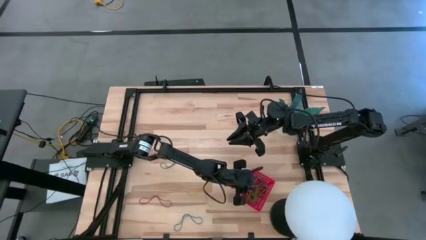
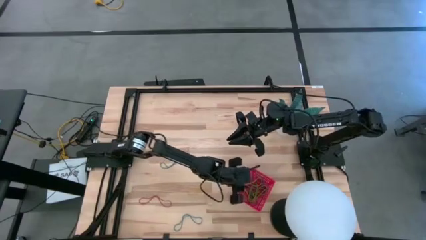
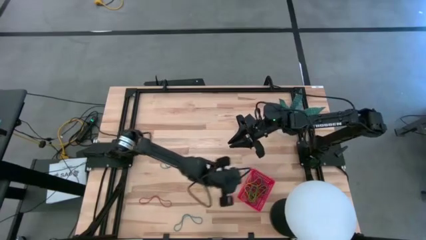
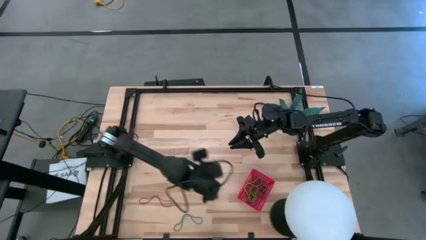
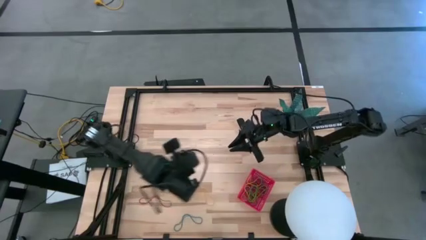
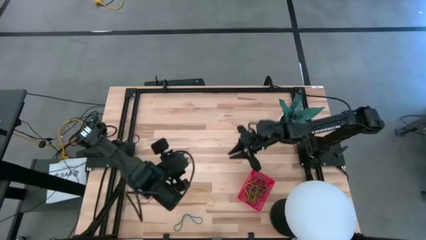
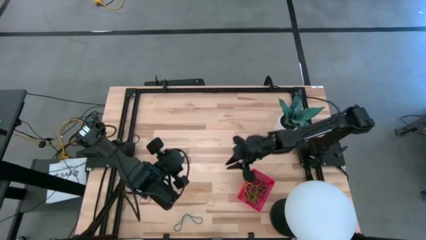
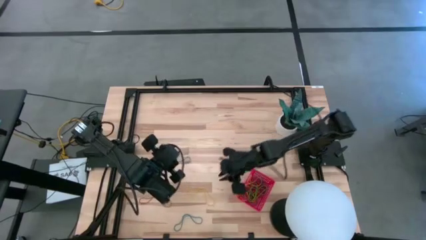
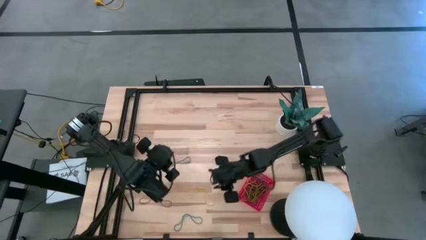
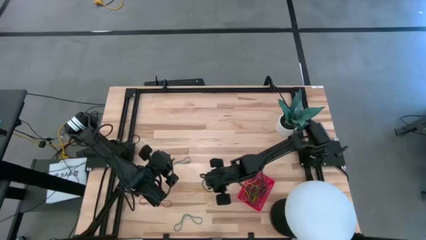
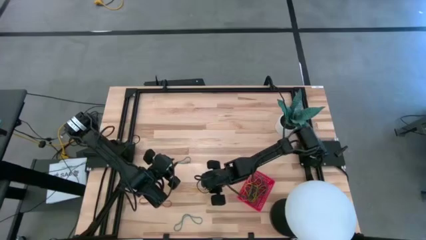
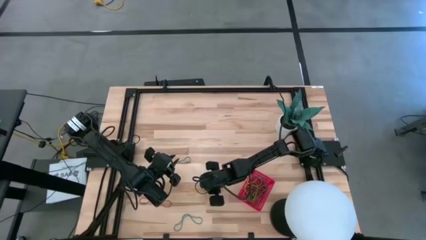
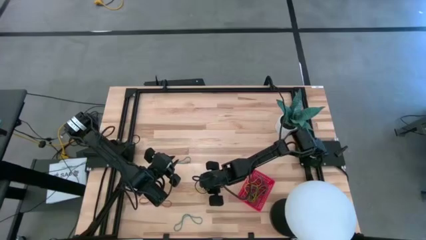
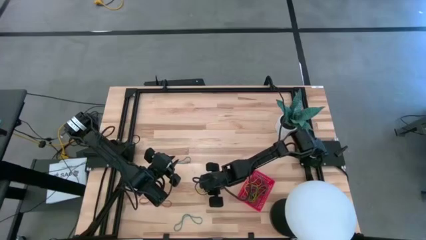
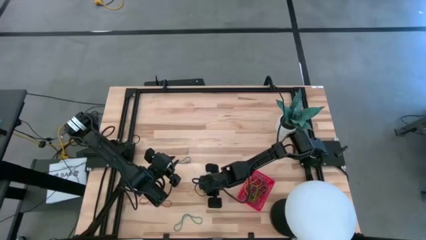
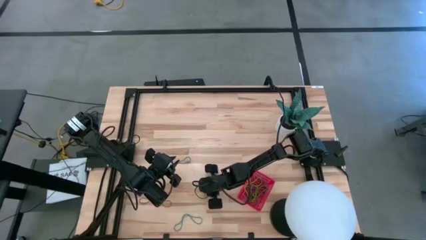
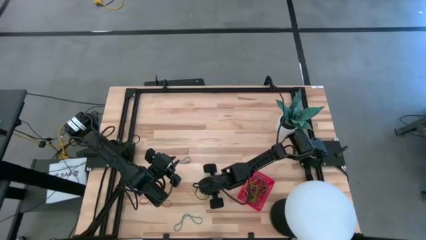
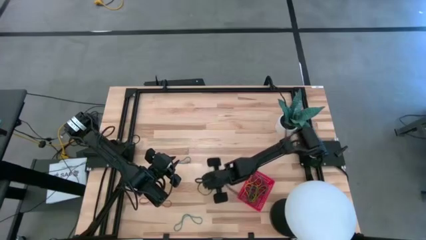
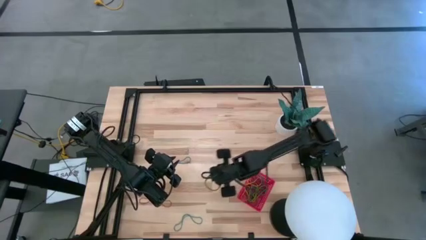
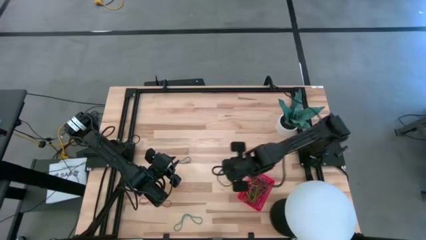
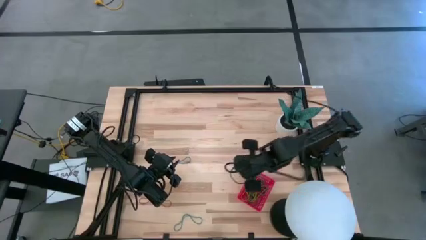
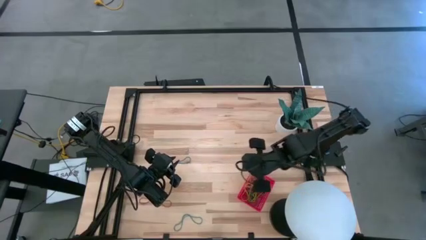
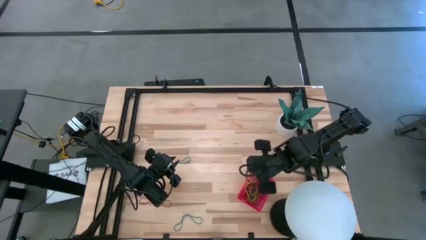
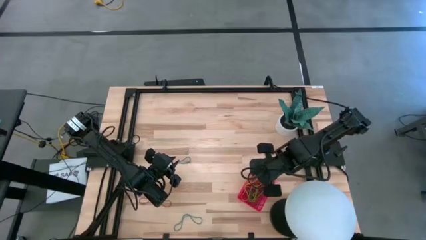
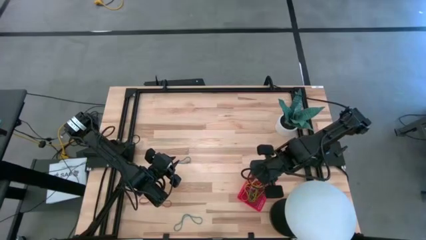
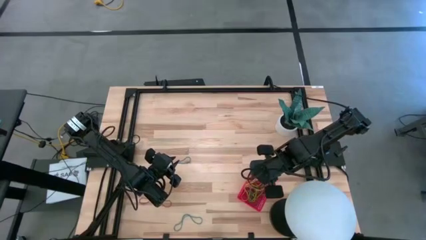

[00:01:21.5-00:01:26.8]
Task: Pick and place items into bin
Put the yellow rubber band into the red bin

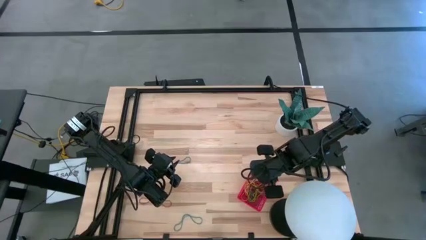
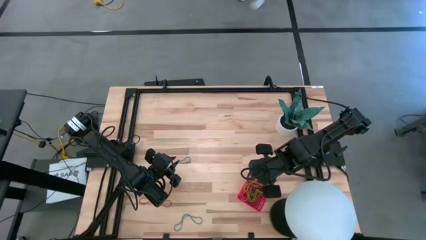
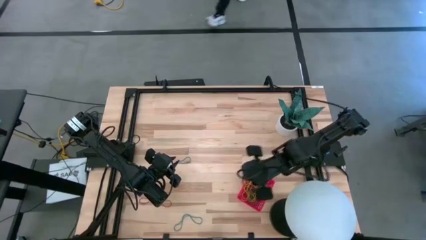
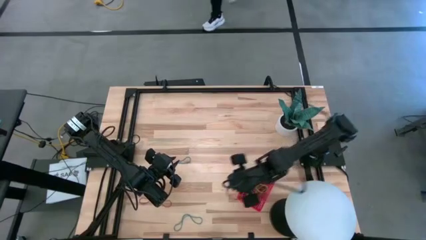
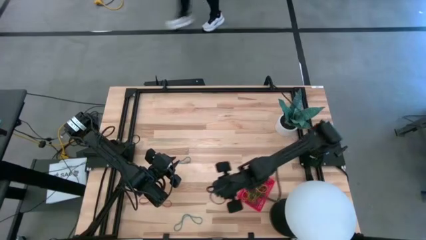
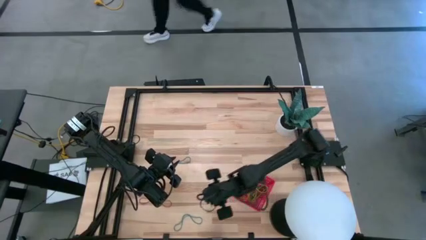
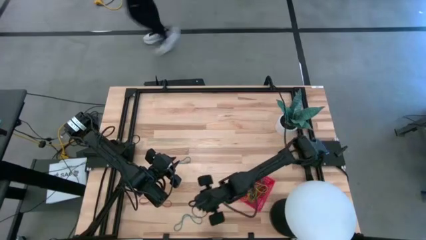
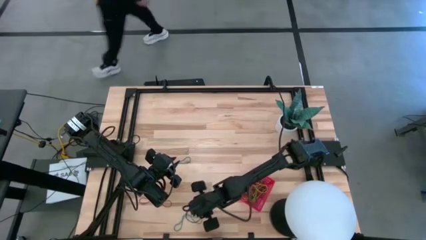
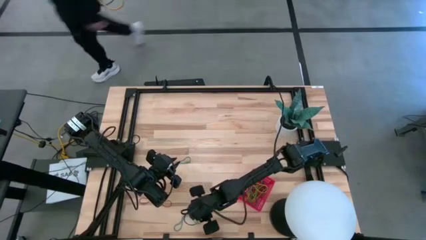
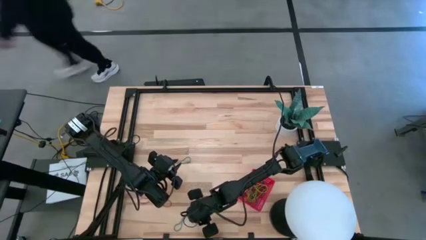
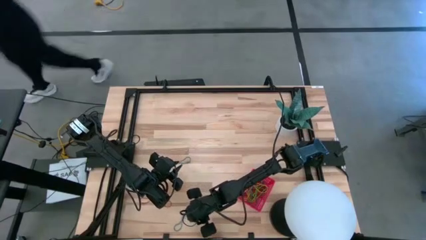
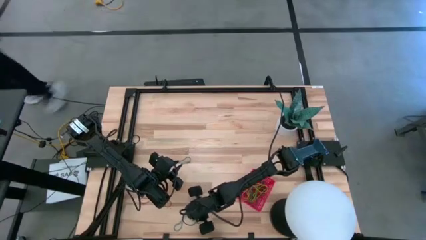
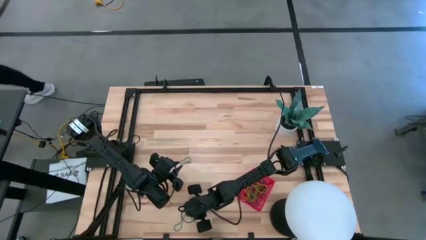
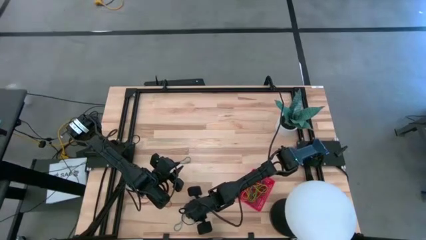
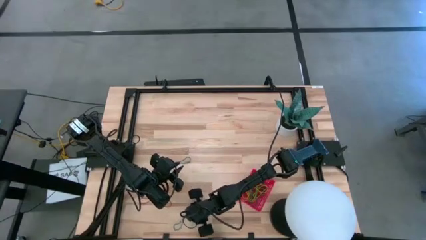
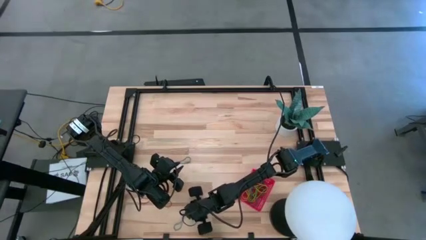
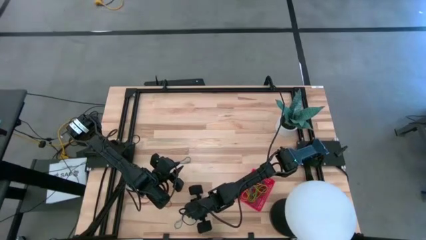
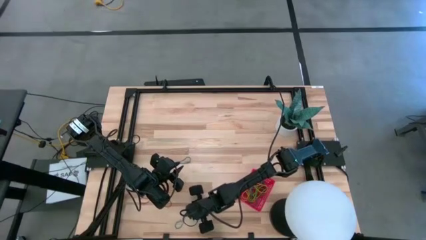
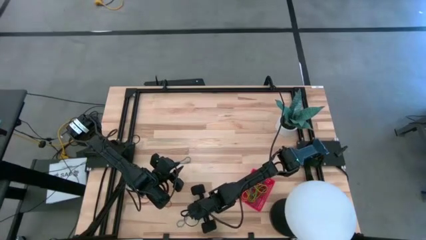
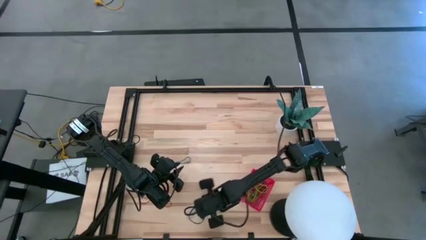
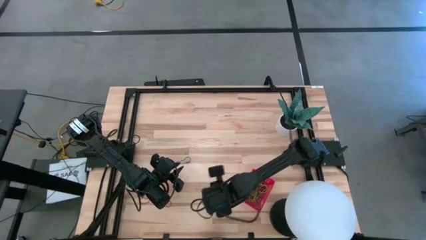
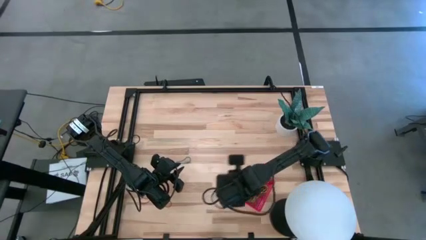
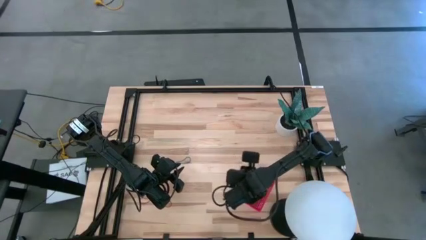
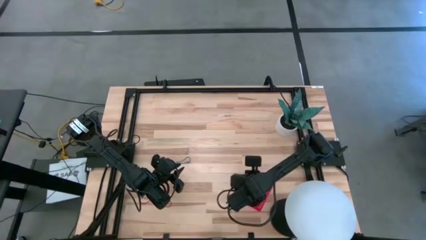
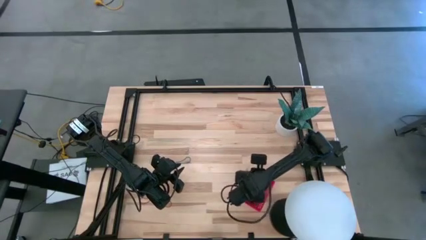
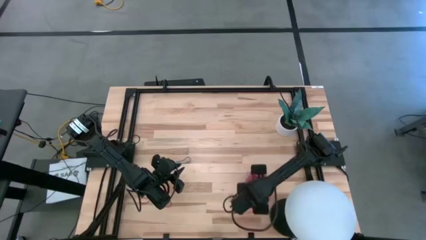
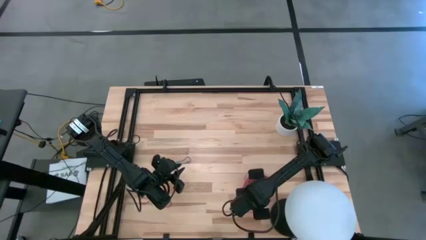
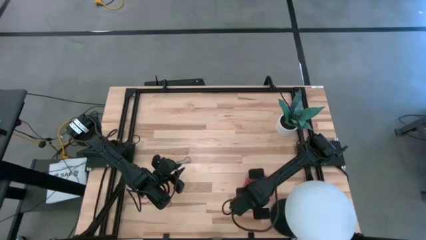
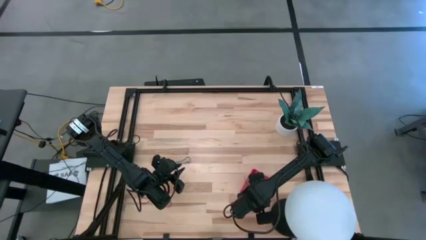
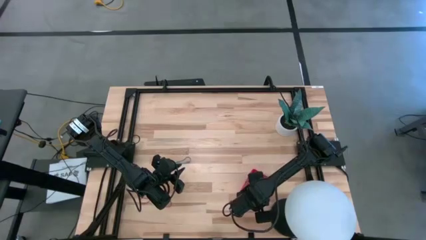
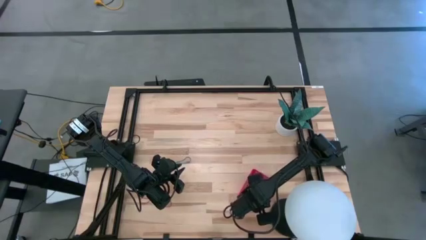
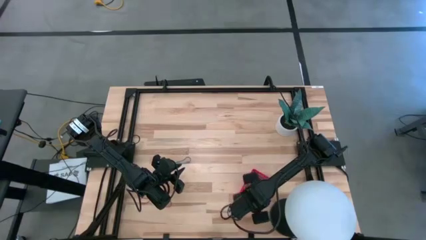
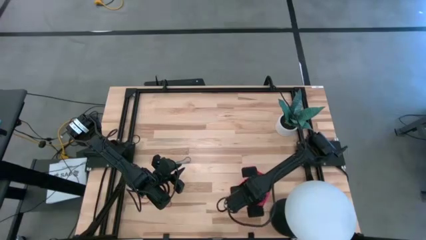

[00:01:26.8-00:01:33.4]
Put the blue rubber band into the red bin

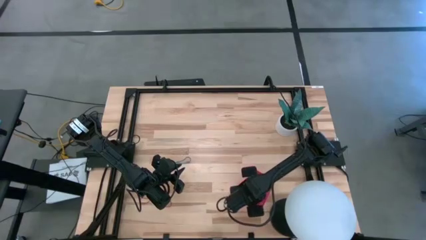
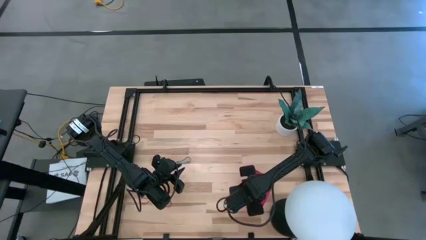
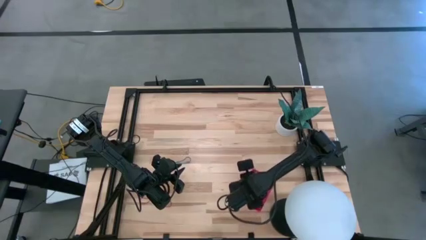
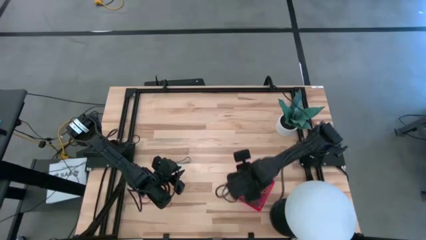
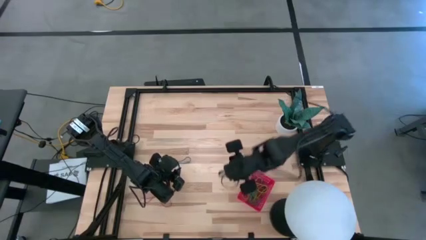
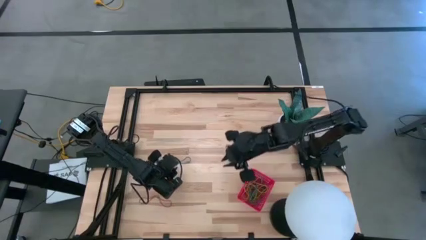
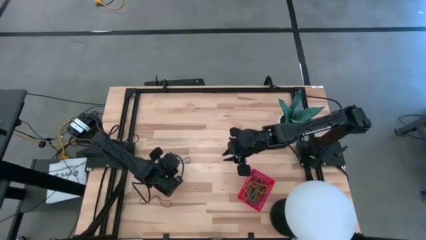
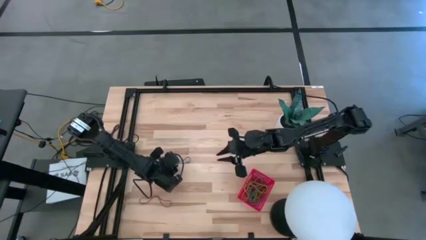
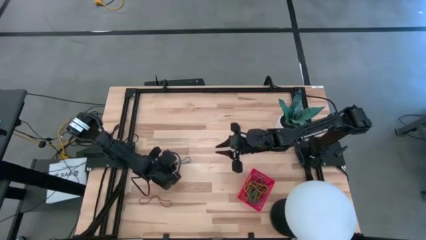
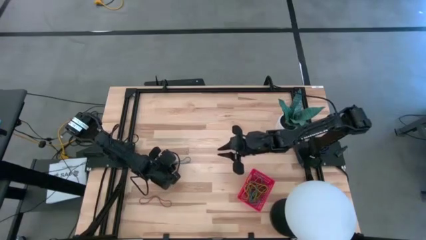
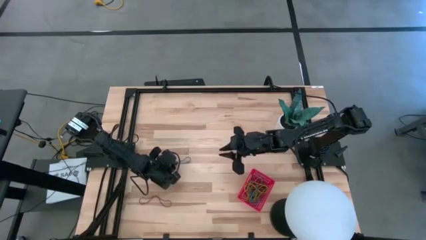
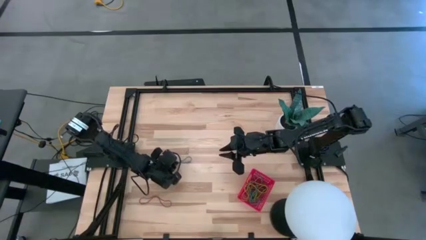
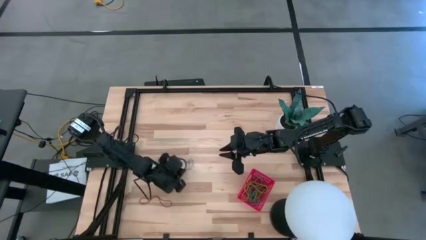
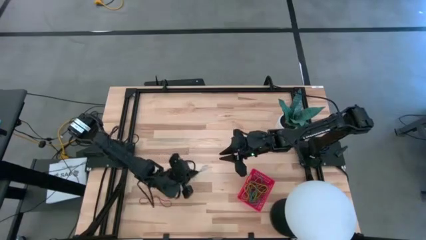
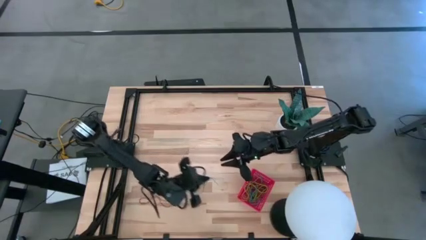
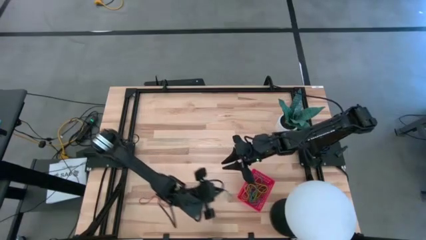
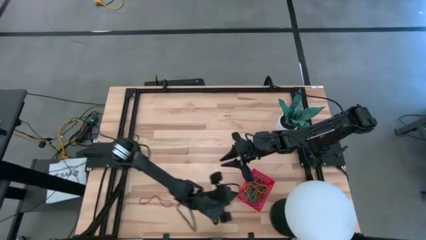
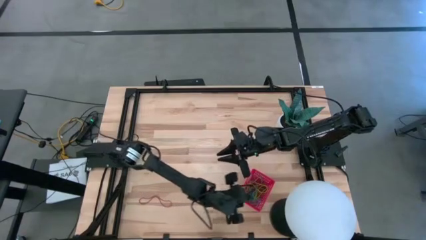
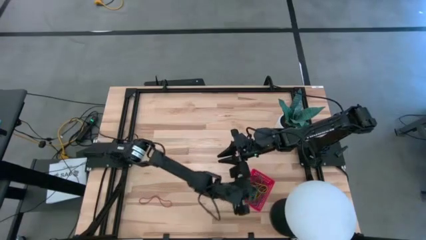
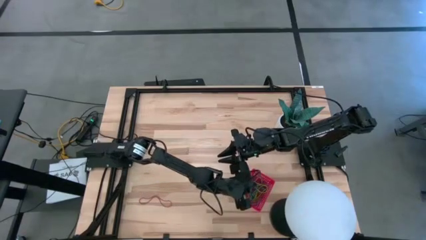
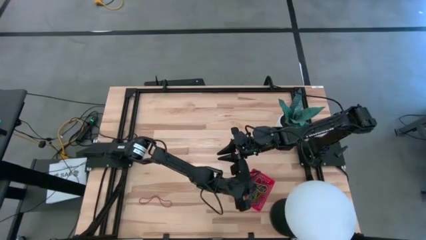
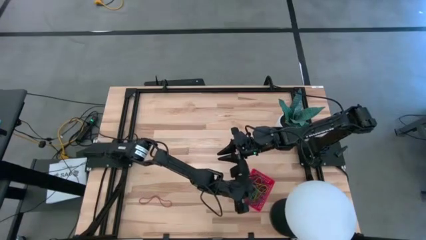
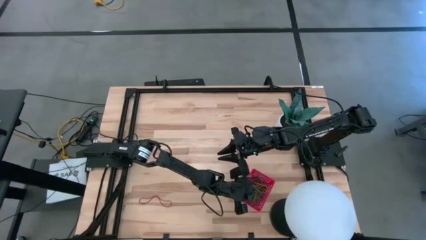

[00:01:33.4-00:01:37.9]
Put the blue rubber band into the red bin
